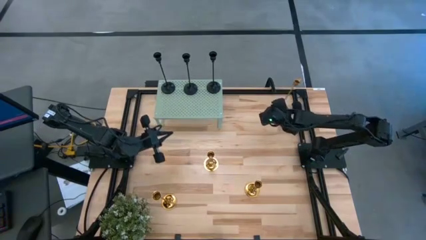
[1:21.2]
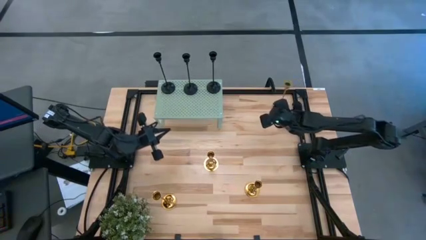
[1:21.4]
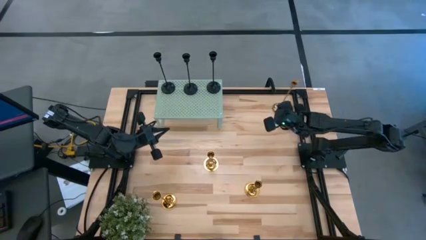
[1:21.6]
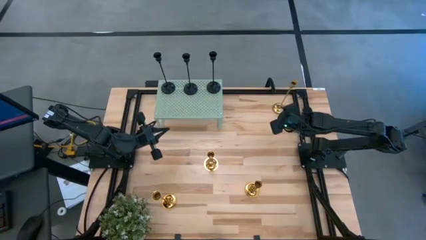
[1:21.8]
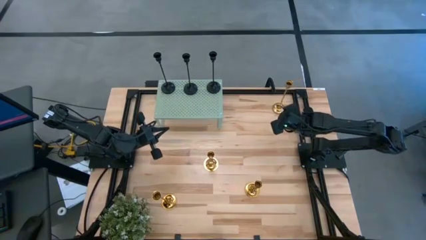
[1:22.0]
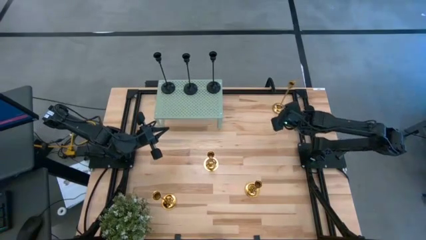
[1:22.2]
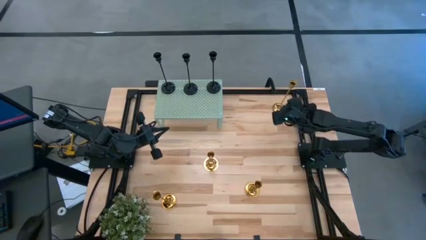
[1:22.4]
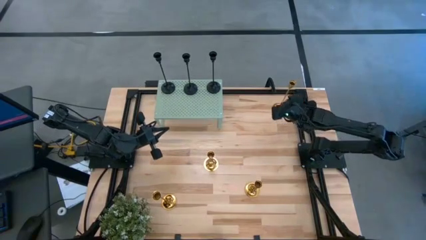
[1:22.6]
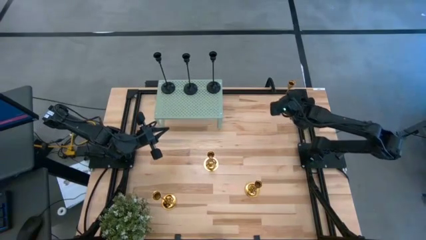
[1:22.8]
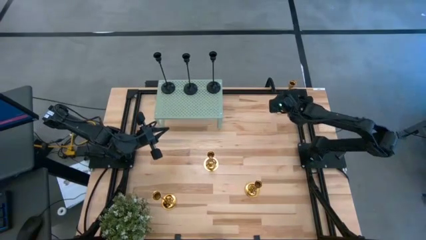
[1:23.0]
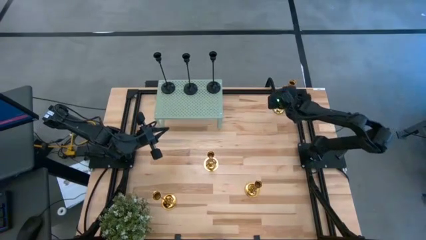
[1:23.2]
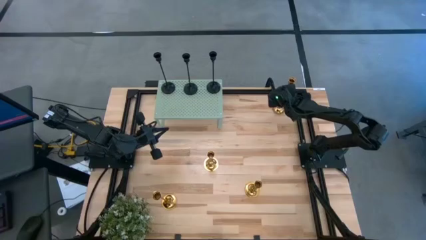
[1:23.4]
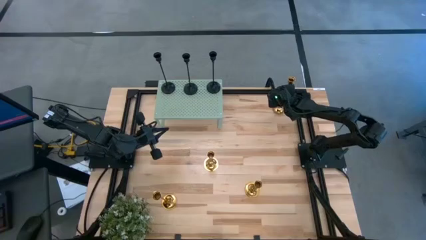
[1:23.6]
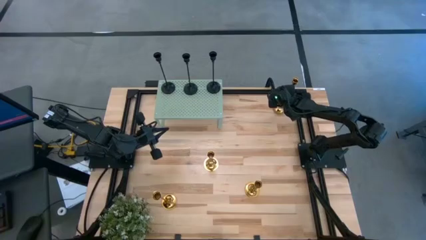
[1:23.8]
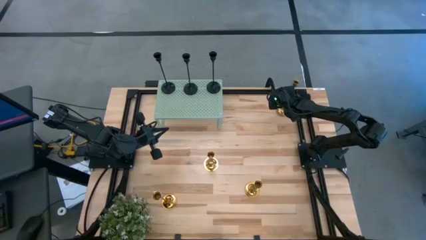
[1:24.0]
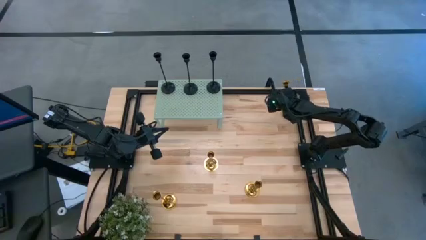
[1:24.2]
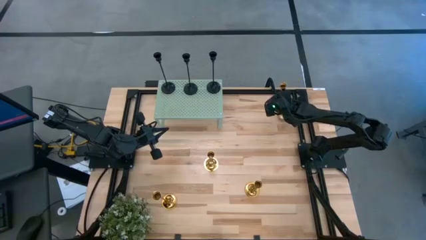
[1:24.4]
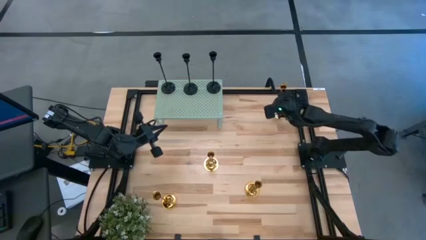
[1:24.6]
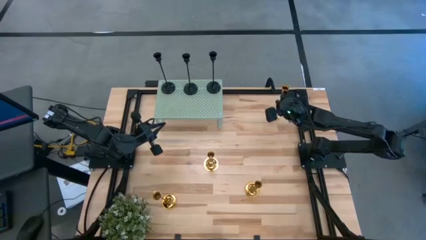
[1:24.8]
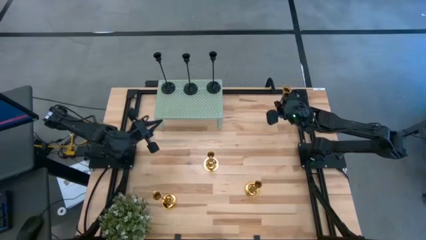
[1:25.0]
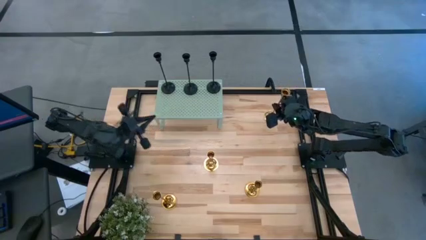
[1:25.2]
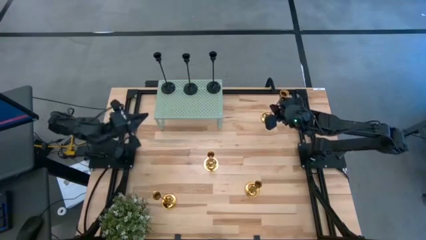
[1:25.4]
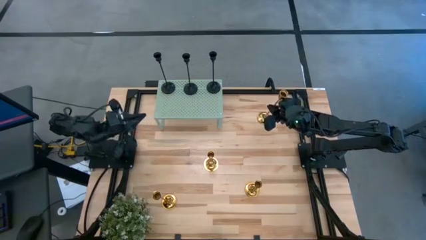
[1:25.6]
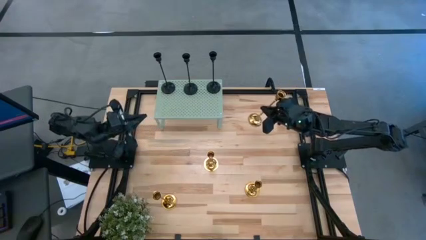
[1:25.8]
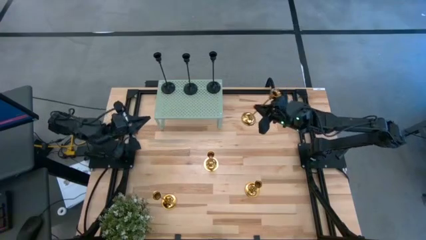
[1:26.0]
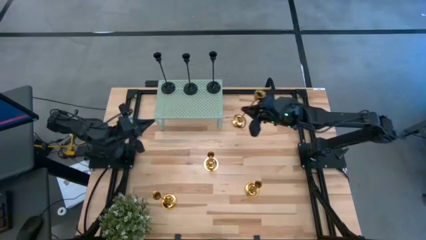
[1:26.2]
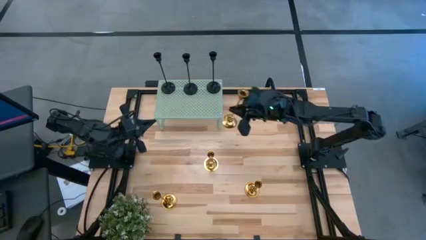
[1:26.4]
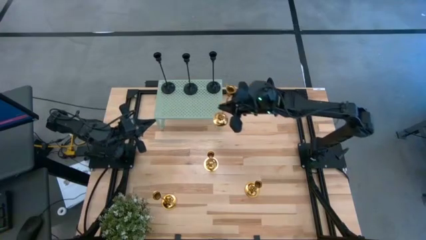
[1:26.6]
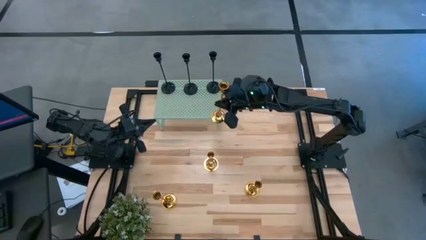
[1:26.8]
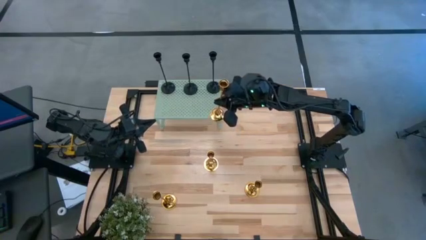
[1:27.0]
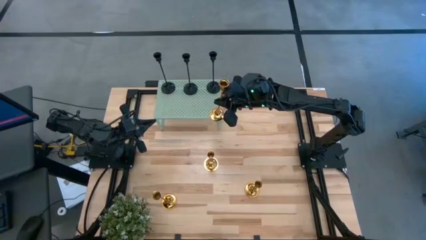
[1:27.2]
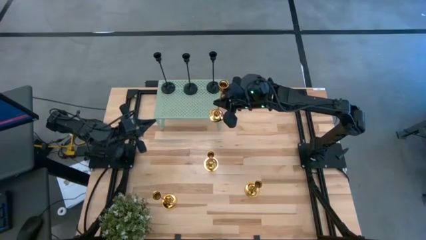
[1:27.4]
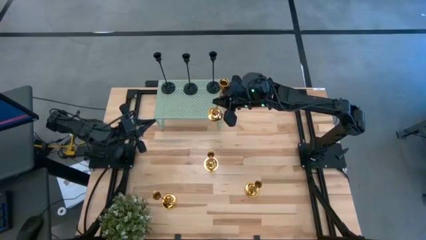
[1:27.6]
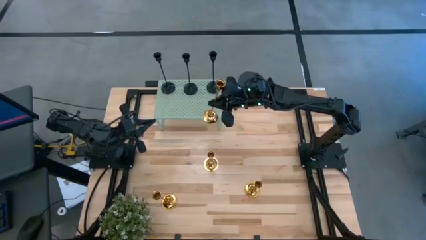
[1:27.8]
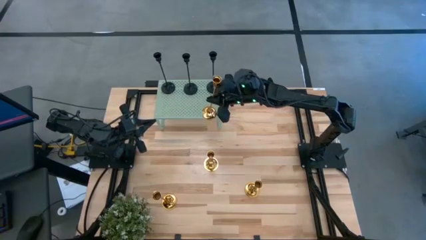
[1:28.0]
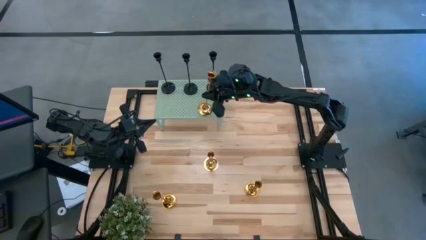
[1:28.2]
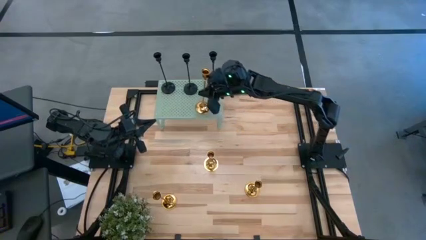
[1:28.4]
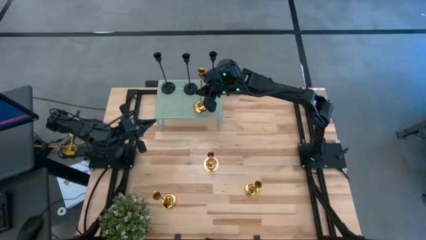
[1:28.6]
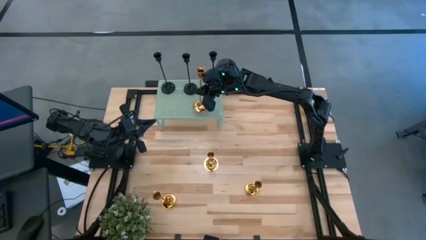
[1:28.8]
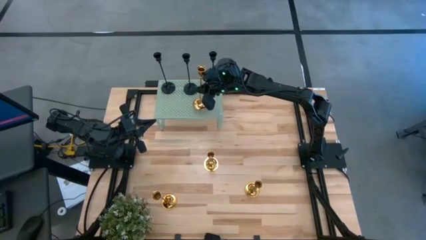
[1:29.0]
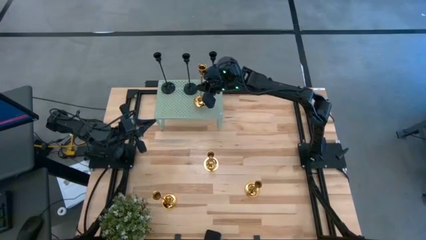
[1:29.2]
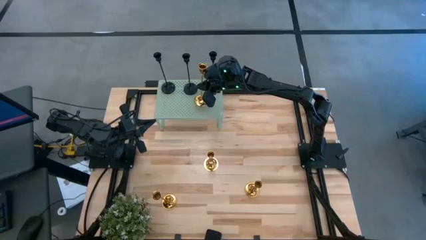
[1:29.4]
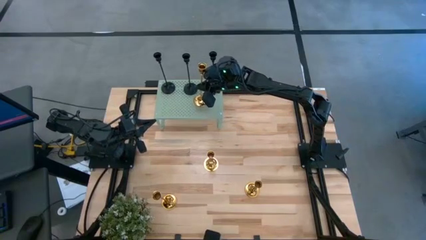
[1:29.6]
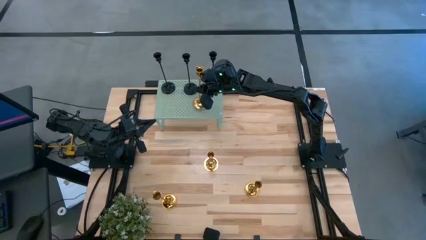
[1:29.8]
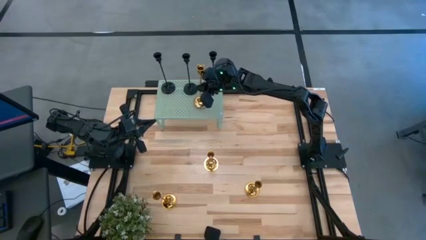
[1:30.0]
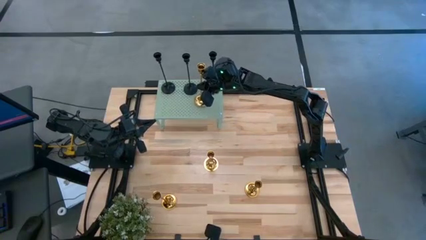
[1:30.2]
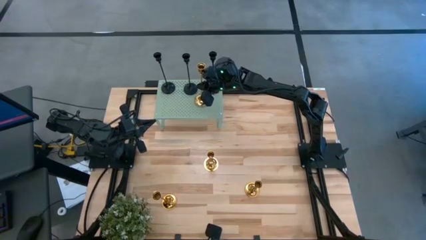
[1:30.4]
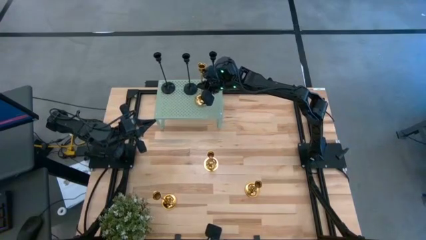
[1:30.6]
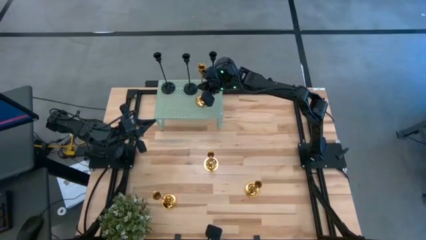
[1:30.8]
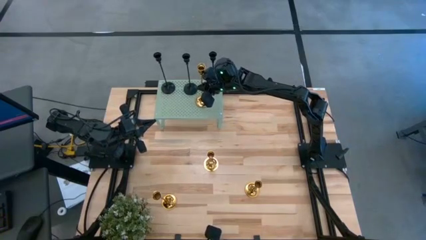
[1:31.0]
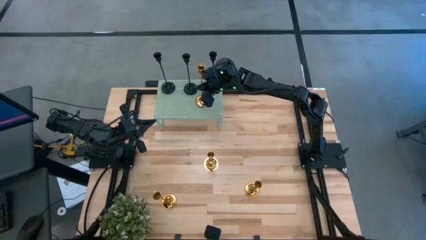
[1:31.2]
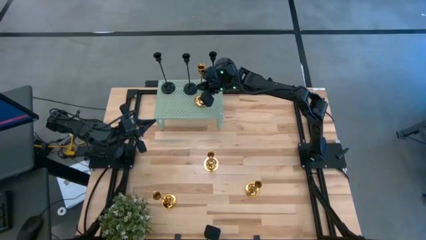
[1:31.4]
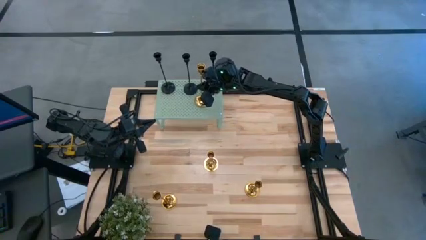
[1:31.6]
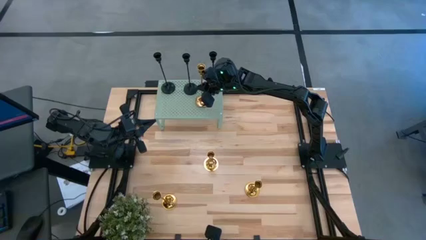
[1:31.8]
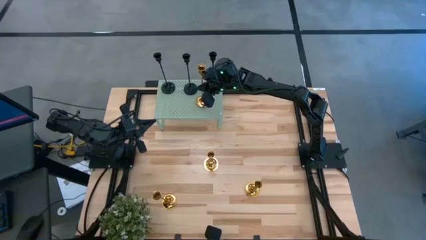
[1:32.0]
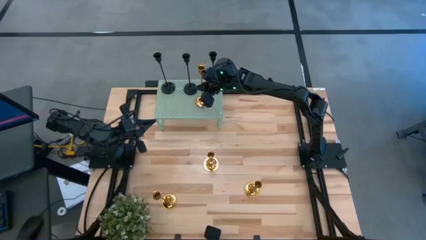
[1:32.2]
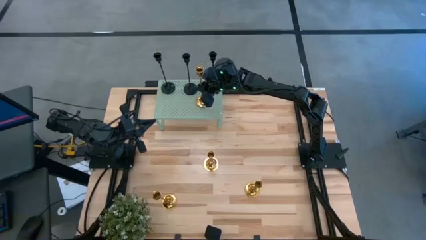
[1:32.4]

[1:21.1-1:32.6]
Task: Pick & Place candle stick holders
Put the gold candle holder on the shelf

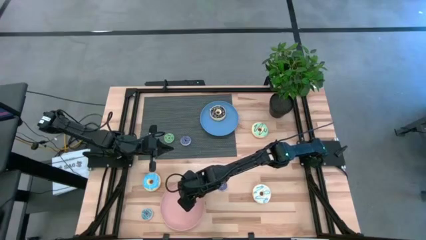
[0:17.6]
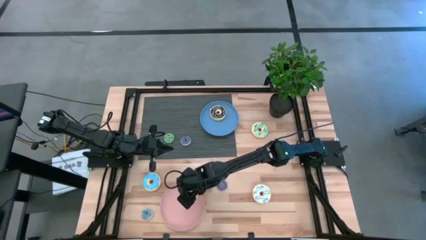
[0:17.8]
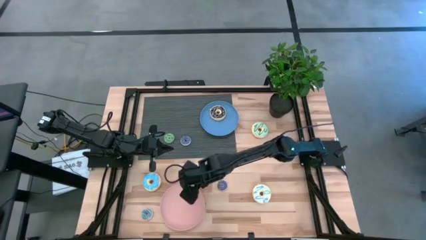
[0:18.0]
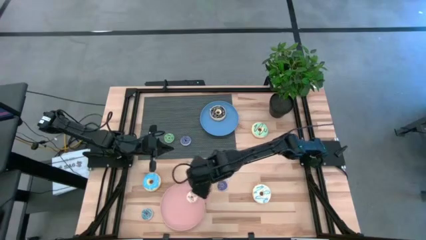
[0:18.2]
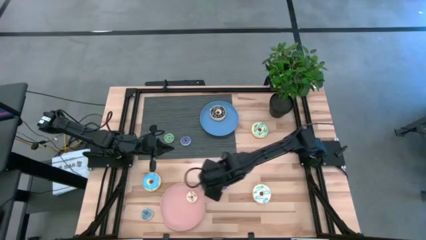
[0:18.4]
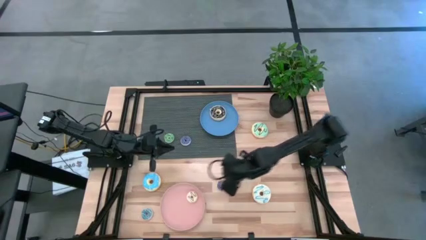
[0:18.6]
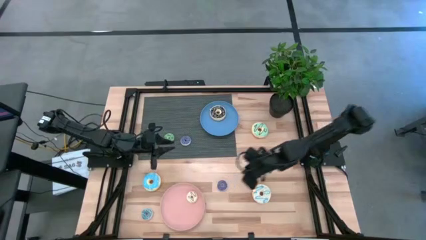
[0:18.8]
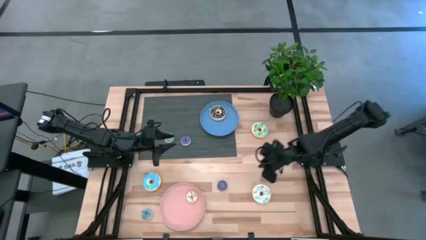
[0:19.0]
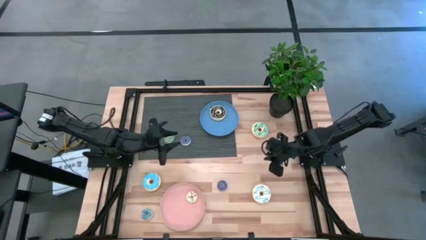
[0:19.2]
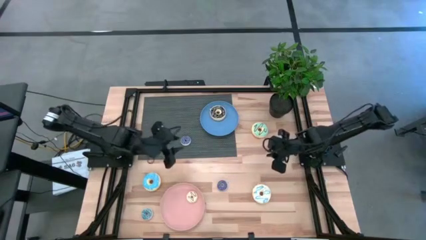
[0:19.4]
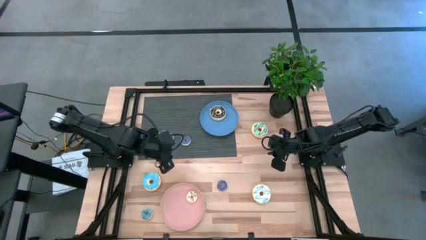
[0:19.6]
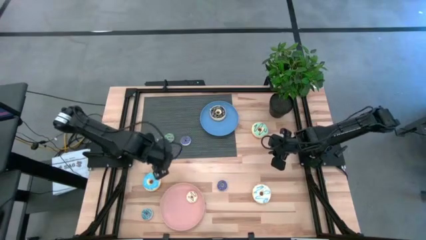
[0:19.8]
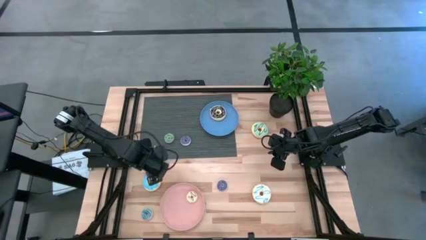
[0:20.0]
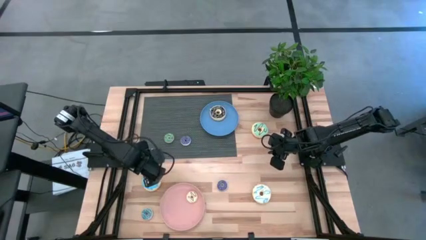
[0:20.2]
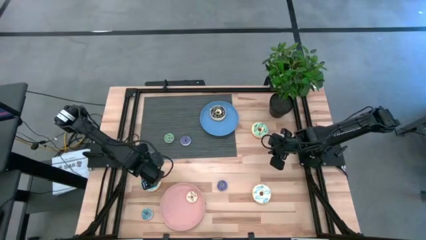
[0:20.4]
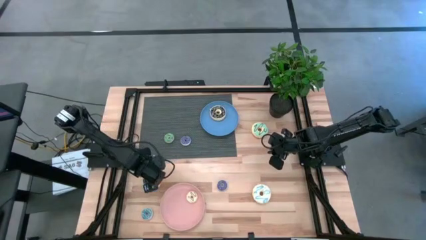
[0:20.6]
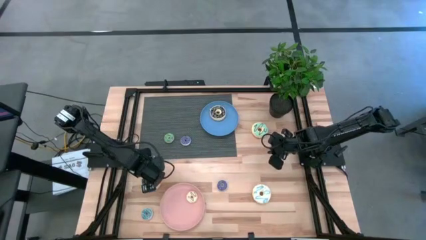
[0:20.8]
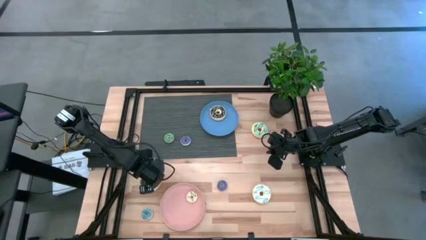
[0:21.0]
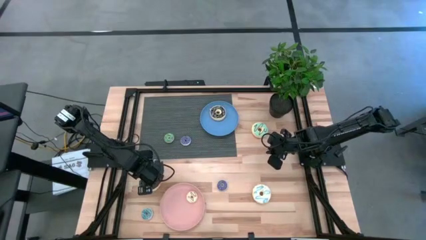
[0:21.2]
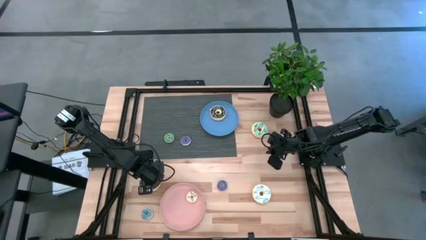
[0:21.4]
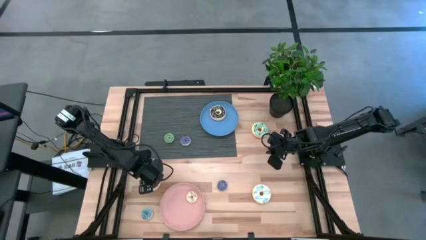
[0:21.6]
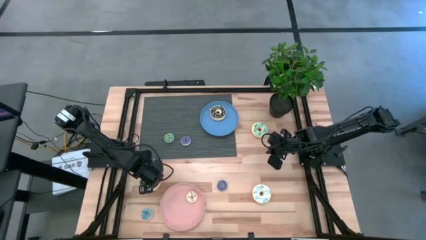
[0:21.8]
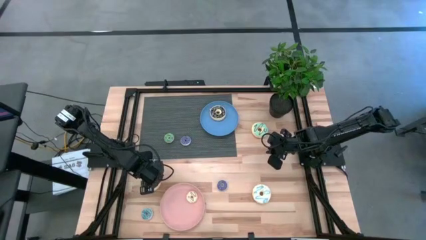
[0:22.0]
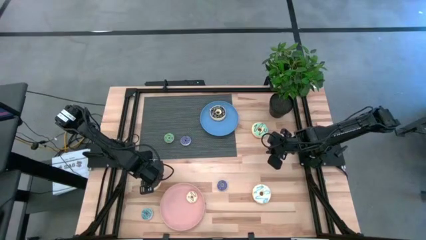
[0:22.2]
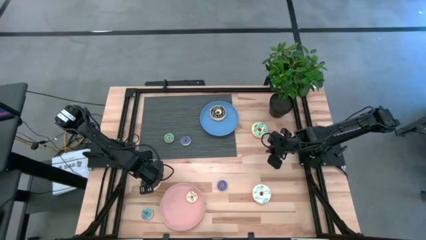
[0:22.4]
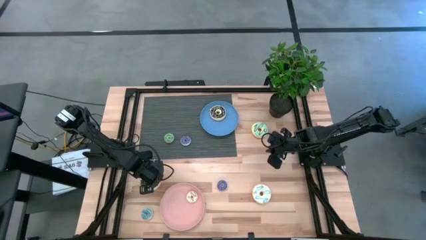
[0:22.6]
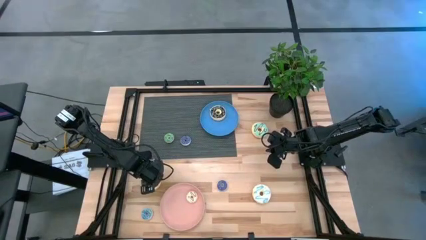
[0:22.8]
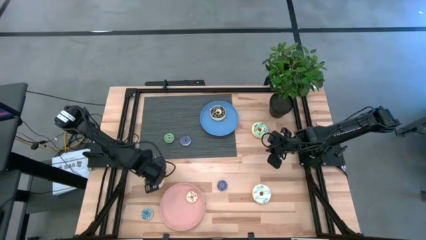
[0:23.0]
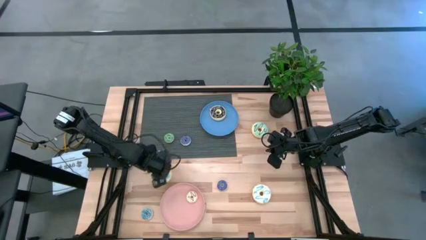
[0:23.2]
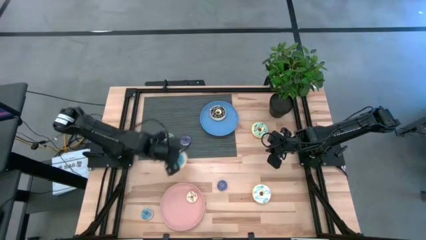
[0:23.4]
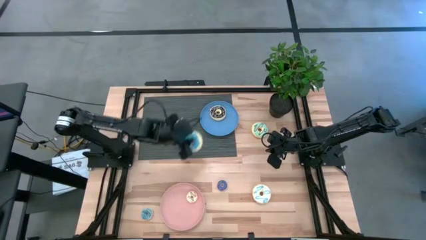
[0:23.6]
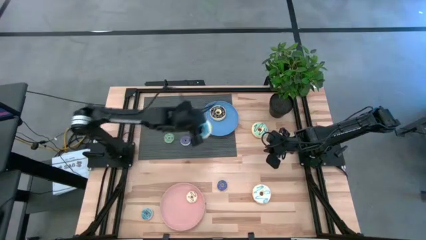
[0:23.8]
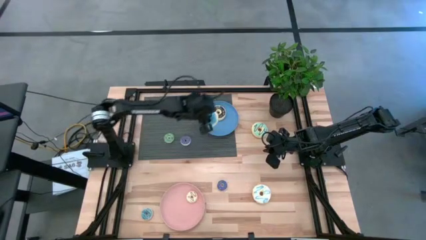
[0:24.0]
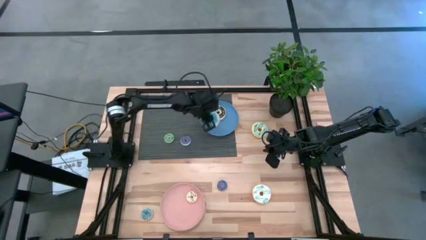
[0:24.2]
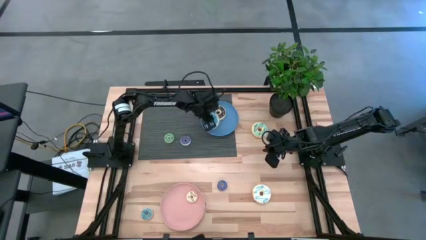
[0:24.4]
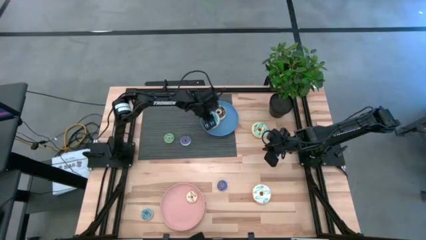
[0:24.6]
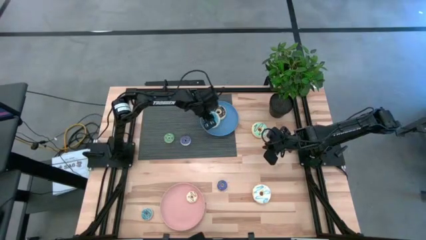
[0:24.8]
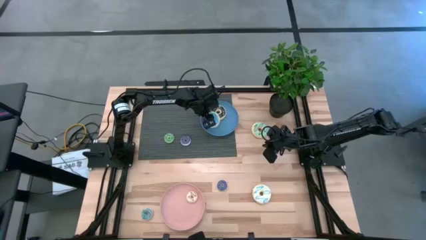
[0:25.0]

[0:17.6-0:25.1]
Task: Pick & Place donuts
Put the large blue donut on the blue plate
